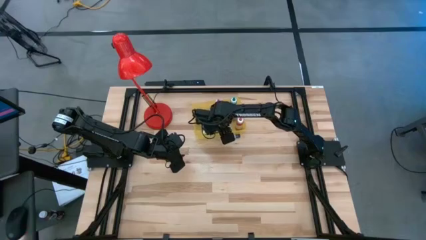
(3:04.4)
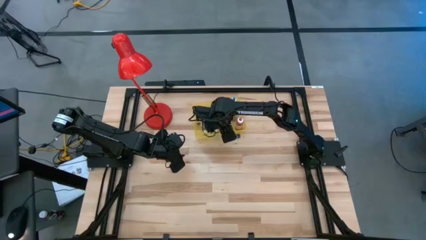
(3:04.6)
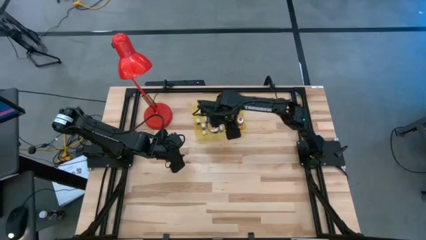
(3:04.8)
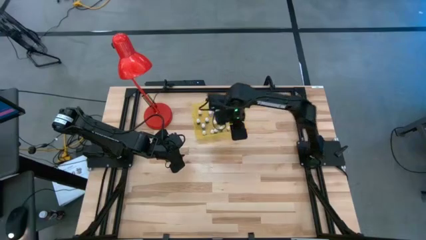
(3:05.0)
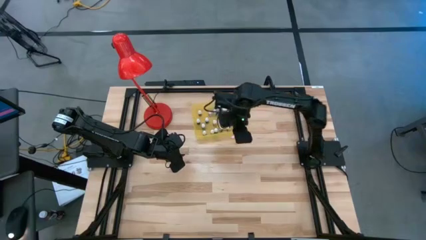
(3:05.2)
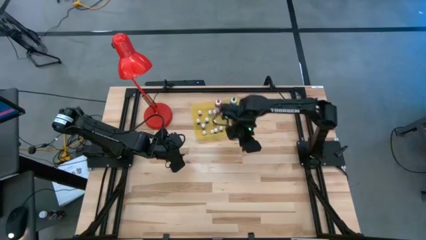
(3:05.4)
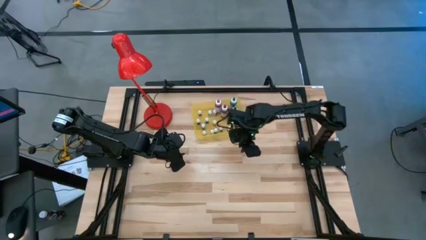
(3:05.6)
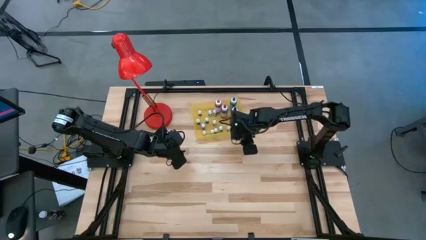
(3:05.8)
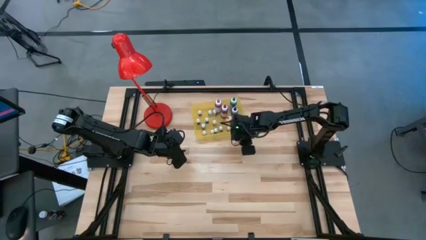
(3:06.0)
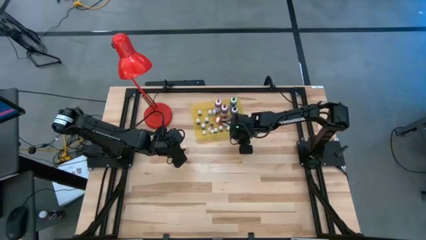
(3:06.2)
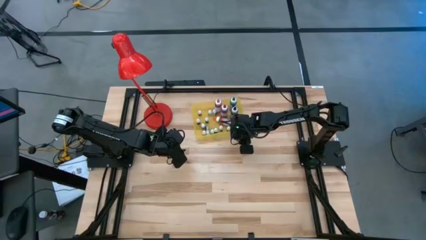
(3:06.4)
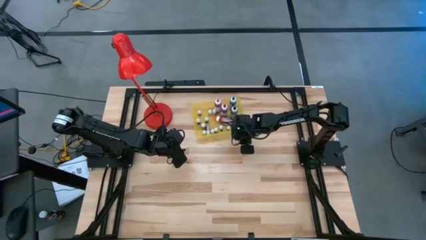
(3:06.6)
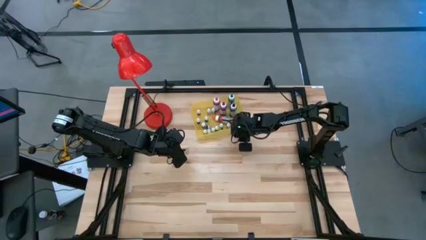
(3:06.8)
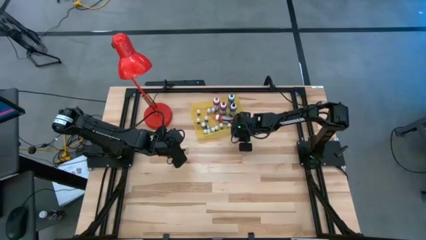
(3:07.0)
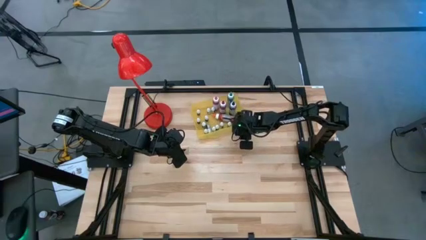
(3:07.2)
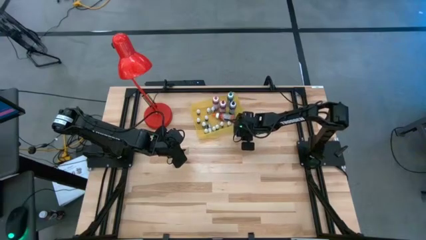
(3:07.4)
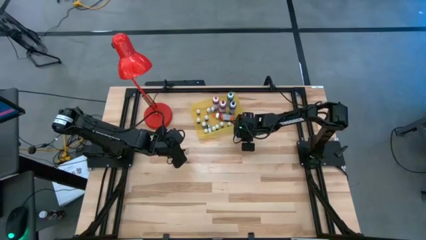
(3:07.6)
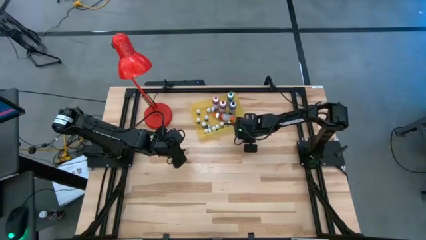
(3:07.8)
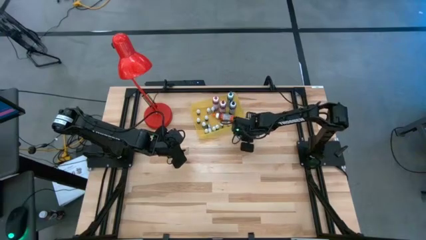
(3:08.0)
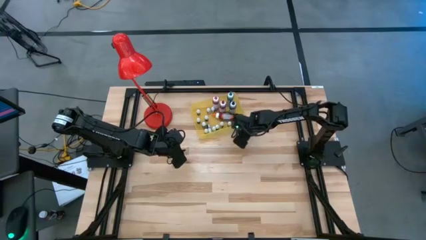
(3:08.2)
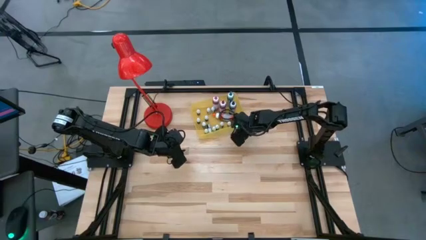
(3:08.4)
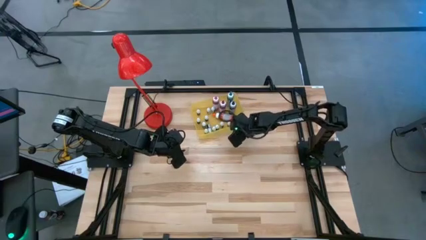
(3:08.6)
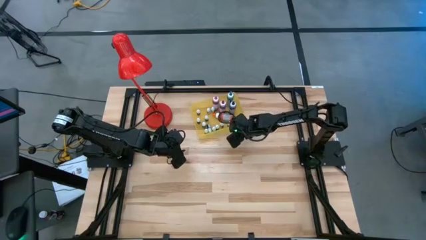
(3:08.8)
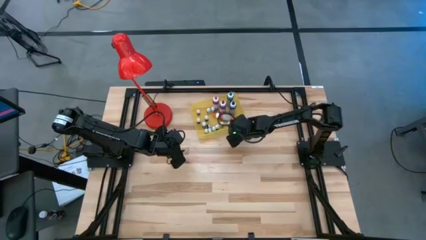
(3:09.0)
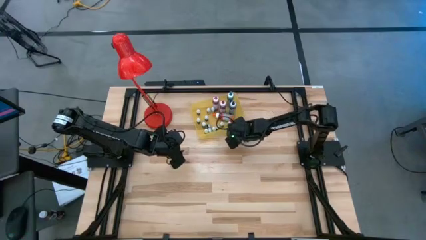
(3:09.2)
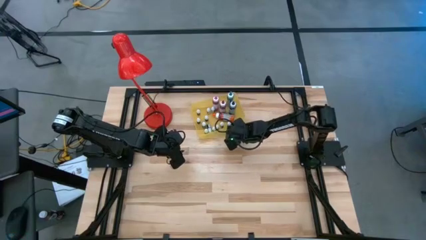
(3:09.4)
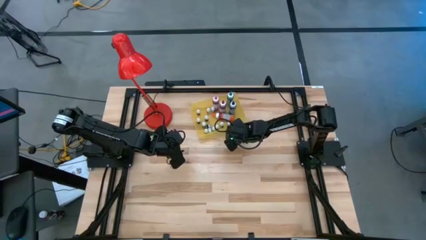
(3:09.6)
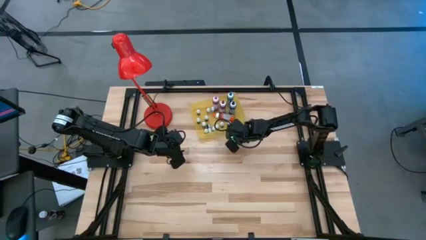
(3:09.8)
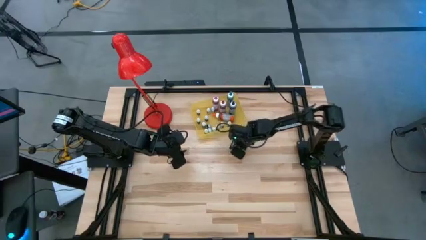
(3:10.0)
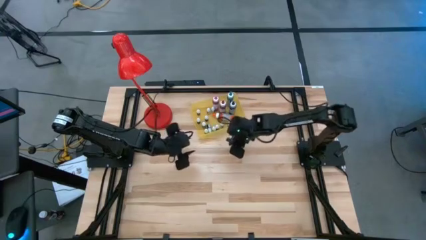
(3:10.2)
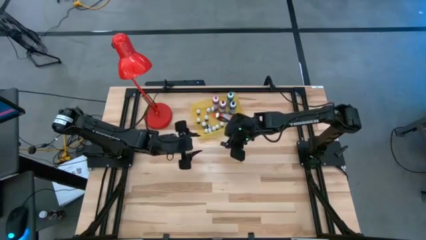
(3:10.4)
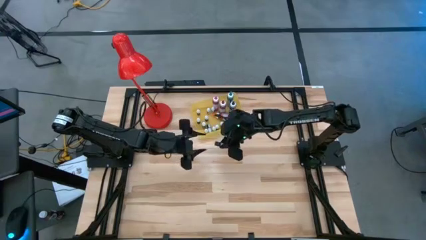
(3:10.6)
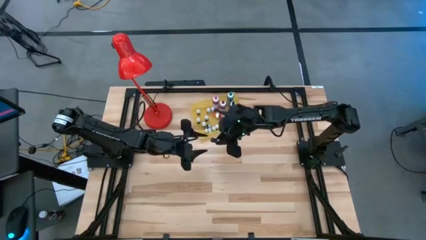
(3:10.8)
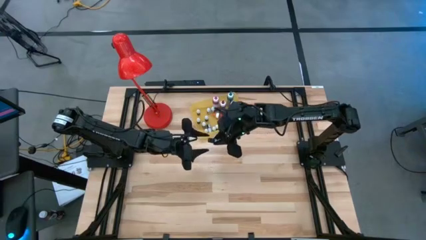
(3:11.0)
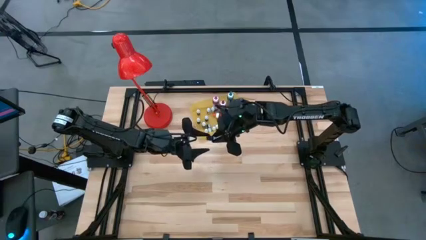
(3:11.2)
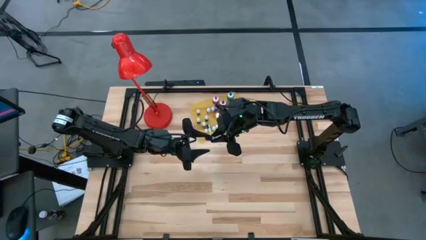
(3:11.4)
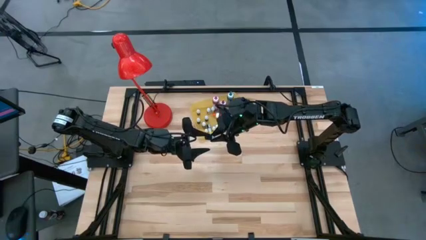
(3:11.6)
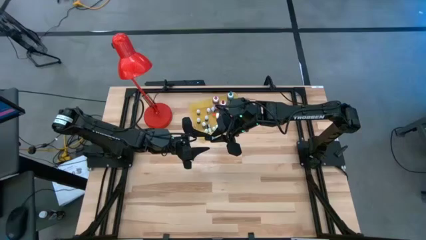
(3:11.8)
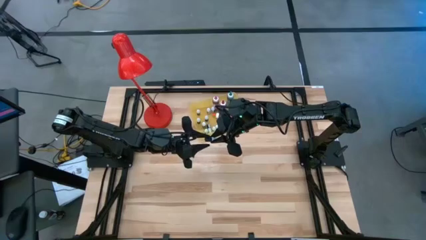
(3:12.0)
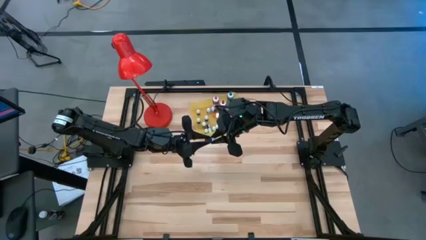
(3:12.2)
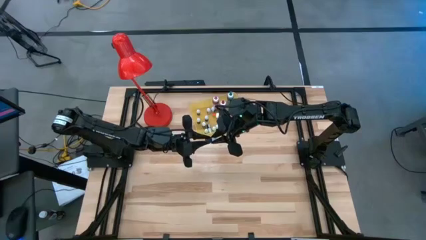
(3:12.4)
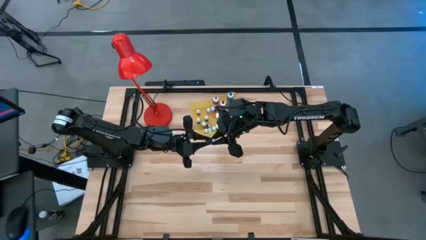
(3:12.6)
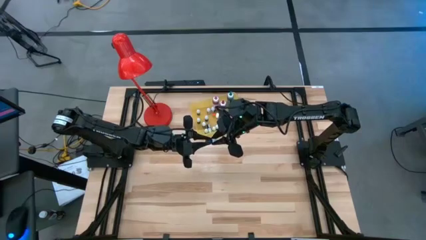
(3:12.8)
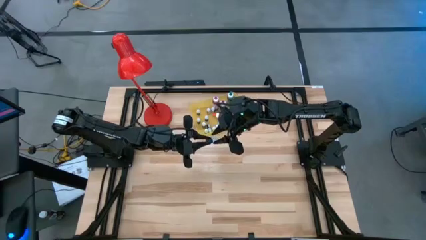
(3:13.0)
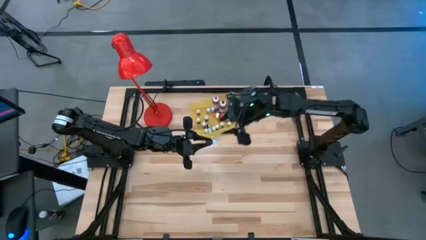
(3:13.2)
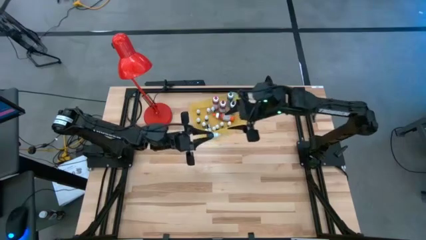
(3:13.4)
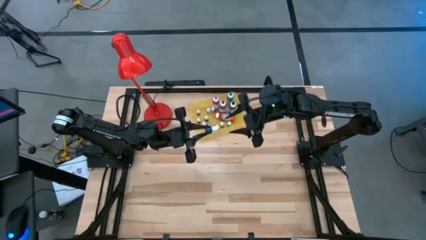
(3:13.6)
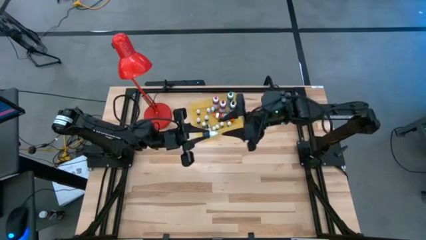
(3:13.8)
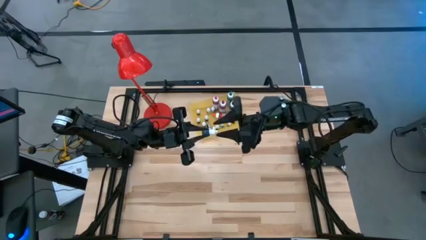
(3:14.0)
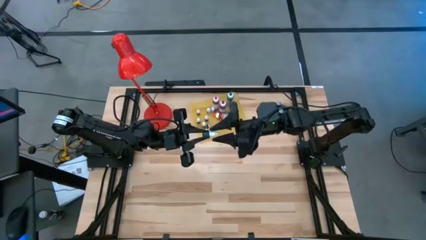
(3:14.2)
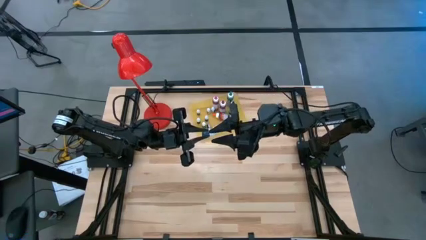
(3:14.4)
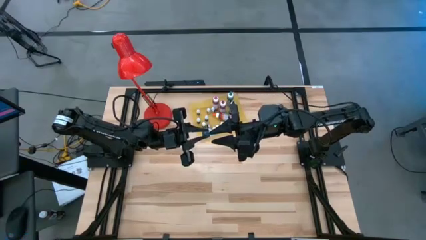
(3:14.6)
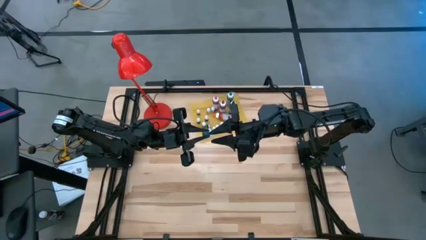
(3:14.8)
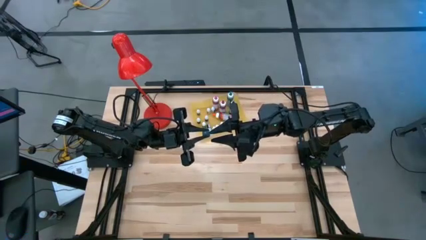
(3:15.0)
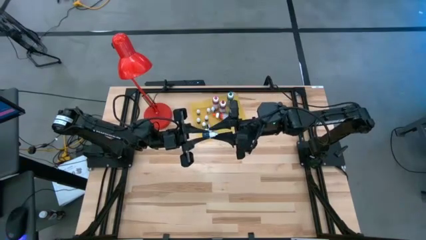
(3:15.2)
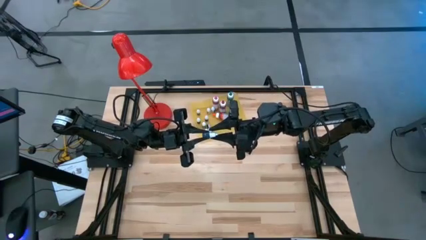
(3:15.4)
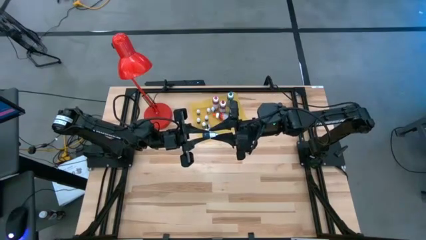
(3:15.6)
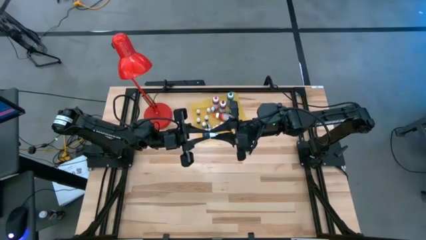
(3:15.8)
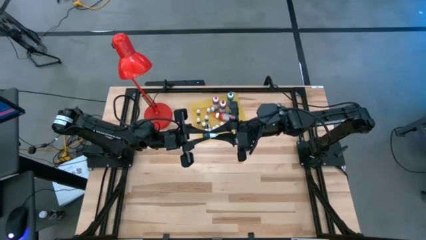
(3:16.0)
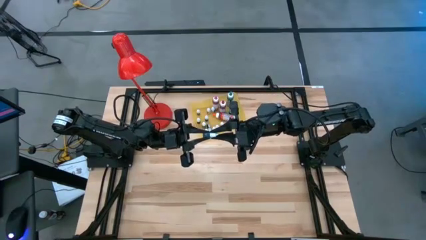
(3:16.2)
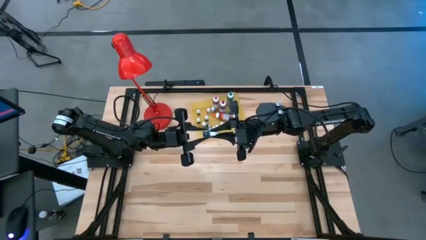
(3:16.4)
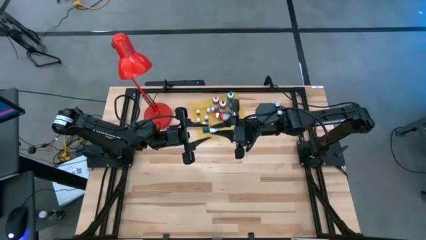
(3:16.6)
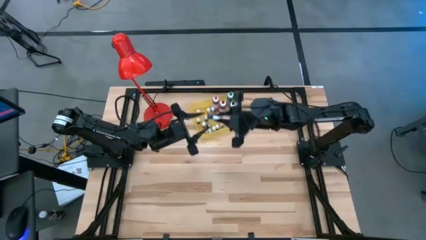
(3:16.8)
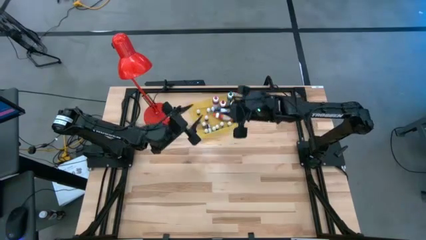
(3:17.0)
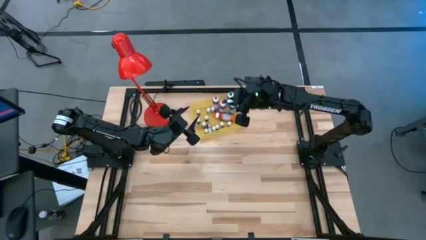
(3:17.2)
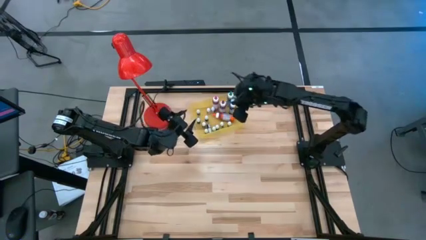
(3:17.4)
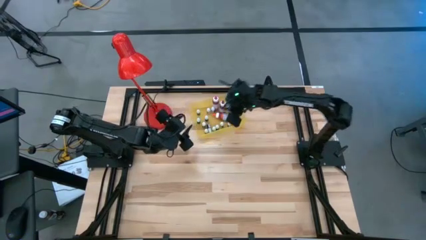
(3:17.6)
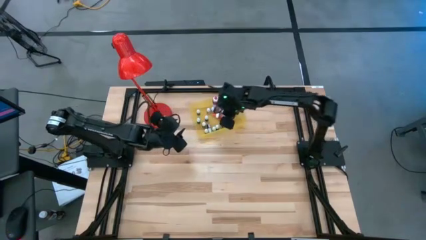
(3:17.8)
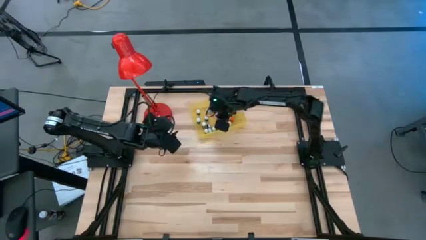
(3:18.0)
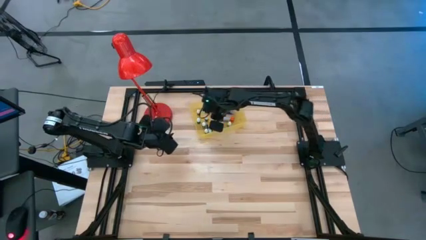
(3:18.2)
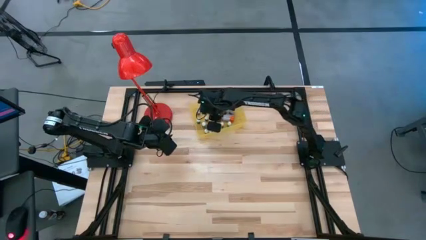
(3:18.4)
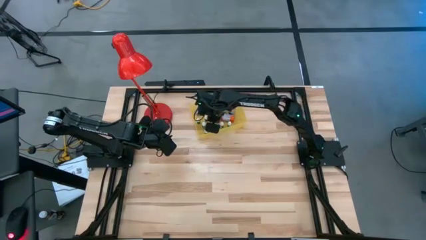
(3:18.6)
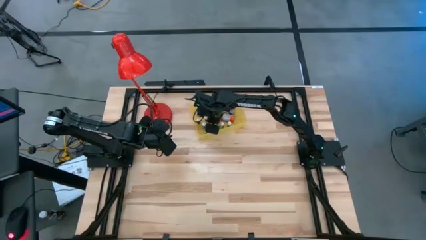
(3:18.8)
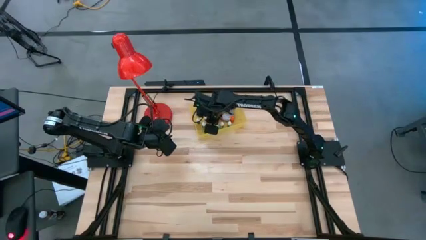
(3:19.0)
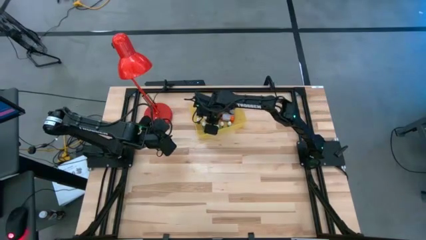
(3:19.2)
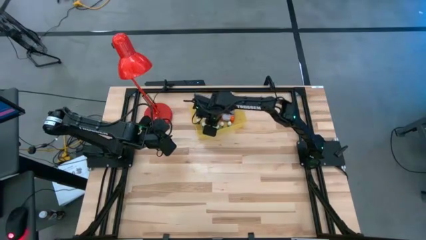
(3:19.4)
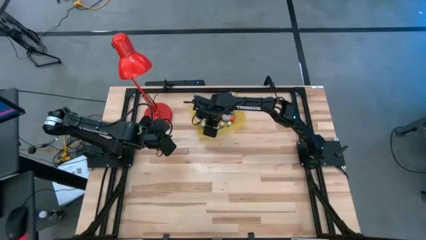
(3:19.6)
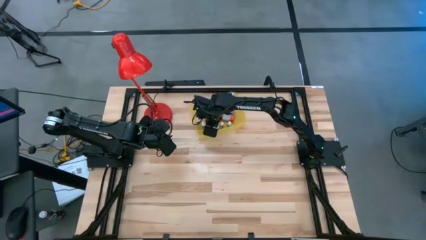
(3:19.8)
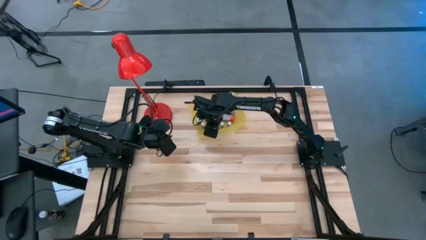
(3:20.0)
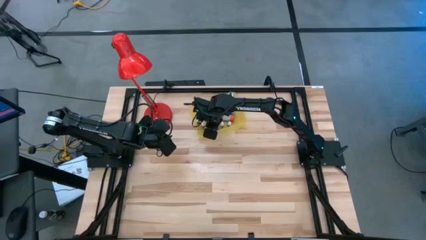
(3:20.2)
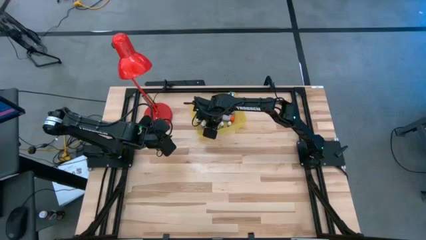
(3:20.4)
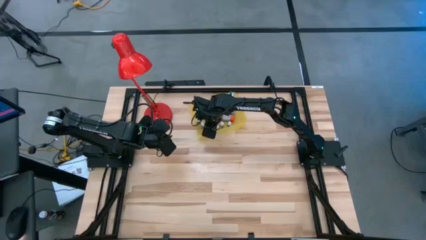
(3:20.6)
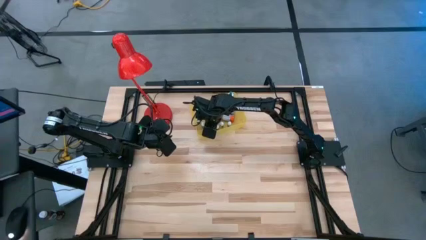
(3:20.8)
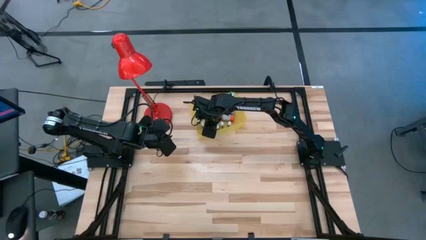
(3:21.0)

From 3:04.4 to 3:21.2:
Task: Pick & Place food coloring
Put the small blue food coloring bottle into the yellow bin
